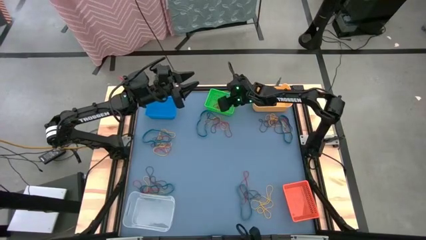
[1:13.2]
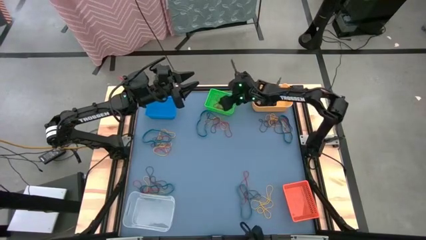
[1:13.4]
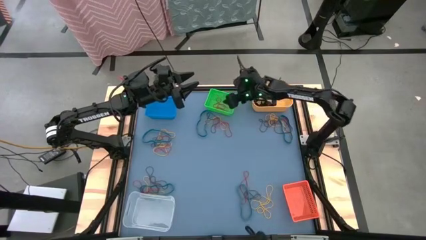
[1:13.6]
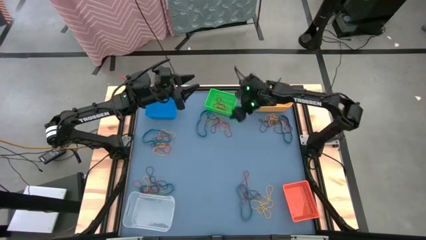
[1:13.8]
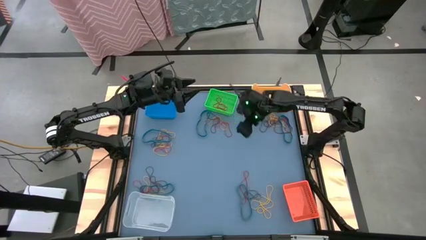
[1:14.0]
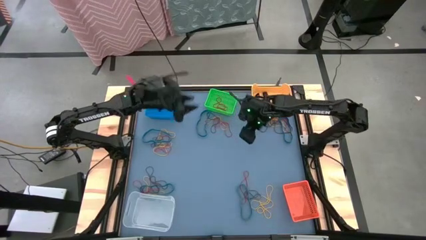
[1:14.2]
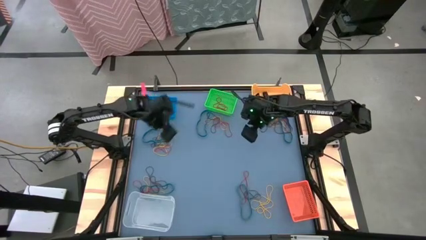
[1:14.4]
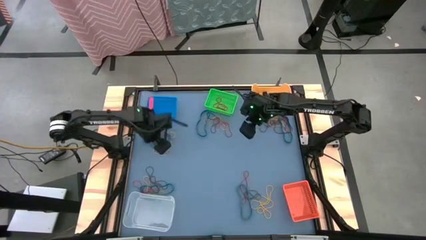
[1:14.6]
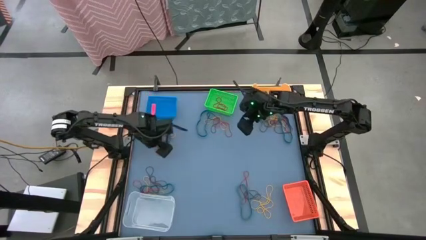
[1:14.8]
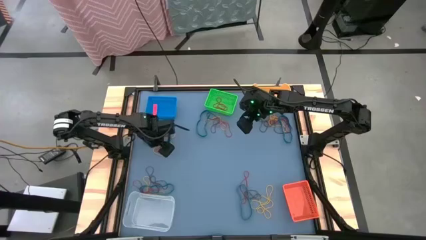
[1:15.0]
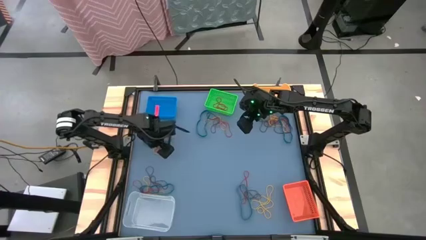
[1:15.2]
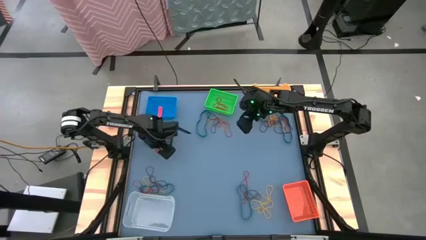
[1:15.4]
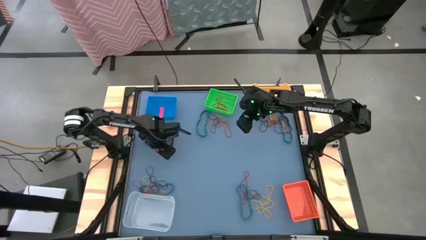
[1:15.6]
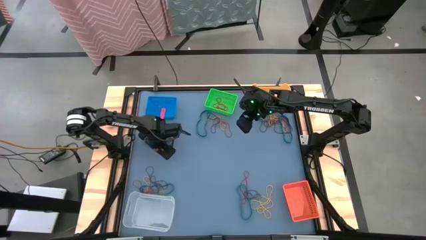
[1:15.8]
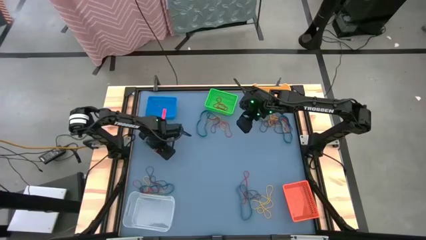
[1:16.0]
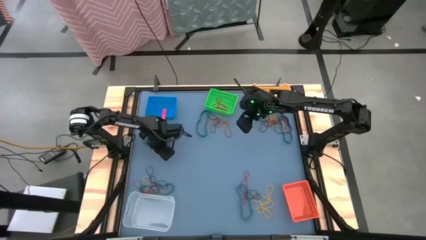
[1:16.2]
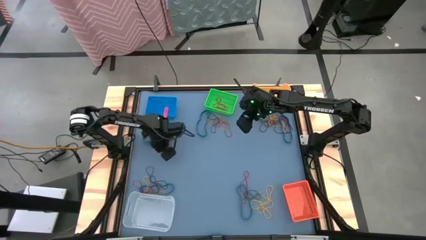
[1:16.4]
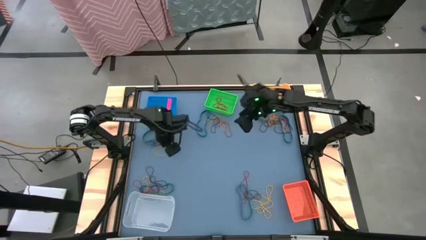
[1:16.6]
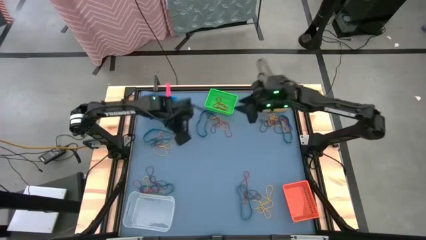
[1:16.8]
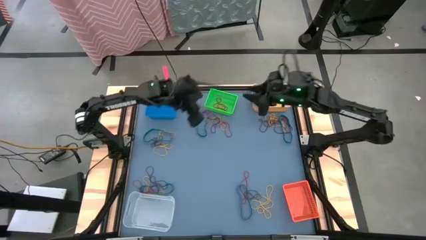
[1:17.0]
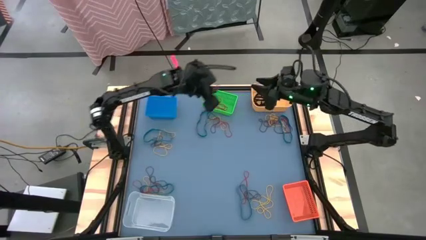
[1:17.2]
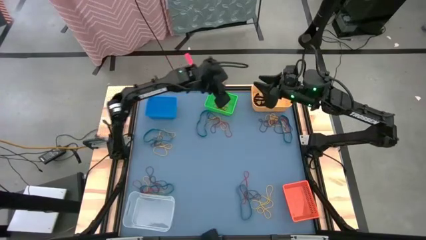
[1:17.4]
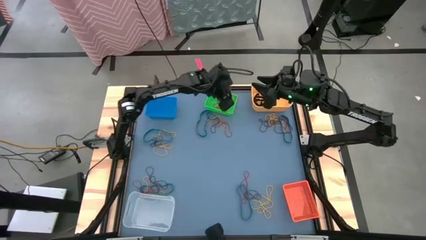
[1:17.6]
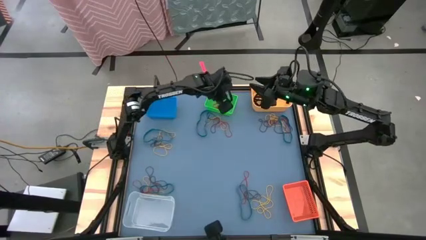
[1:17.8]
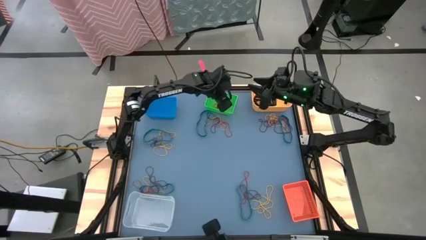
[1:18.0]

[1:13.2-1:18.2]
Task: Sort rubber bands into baskets
Put the red rubber band into the green bin

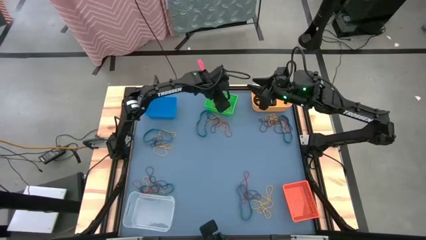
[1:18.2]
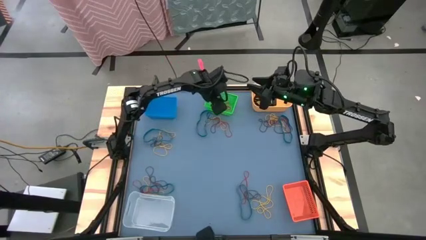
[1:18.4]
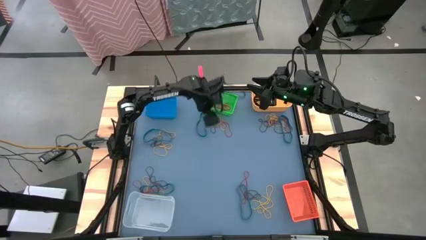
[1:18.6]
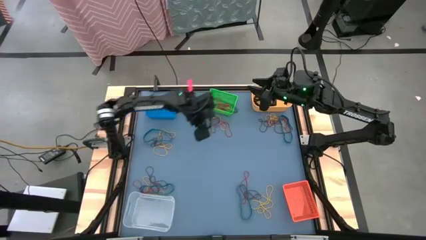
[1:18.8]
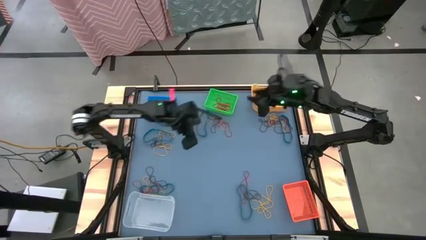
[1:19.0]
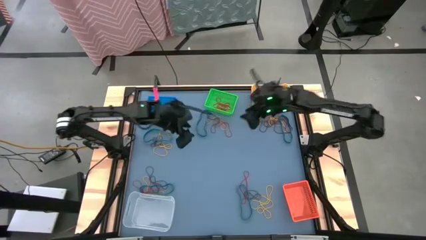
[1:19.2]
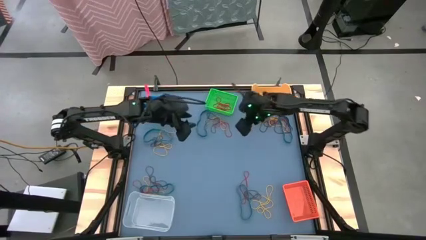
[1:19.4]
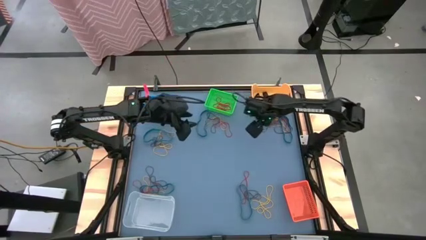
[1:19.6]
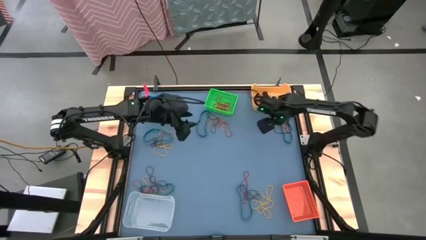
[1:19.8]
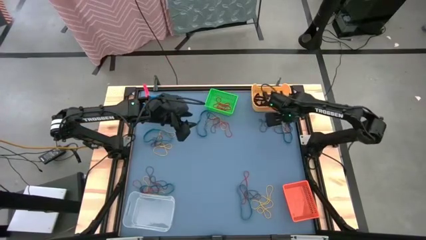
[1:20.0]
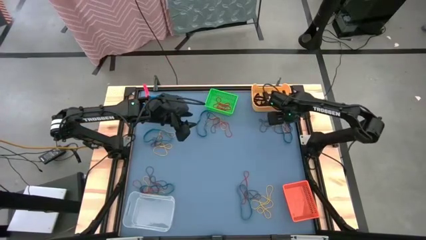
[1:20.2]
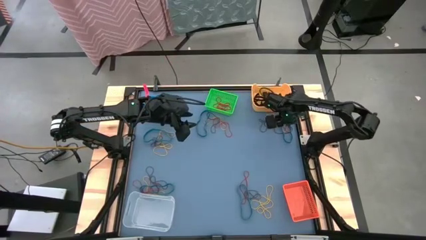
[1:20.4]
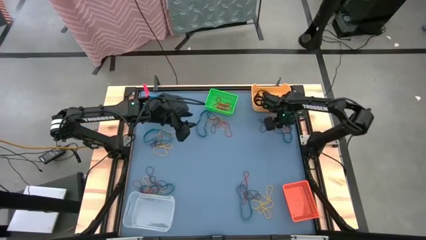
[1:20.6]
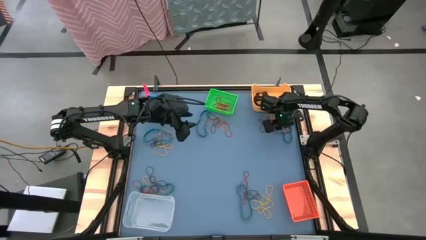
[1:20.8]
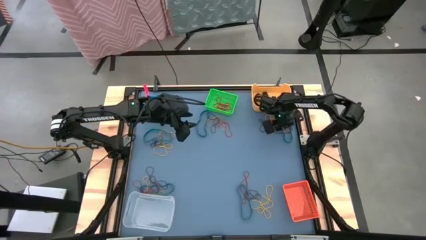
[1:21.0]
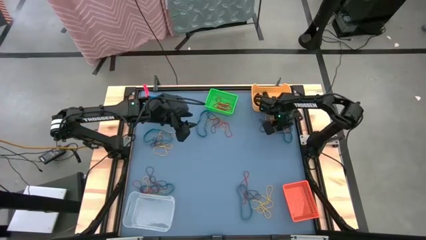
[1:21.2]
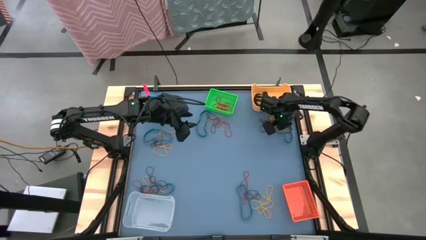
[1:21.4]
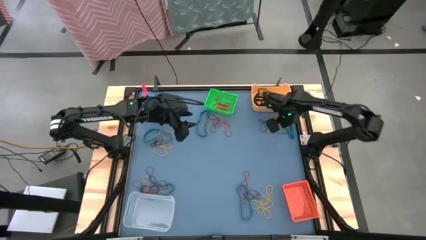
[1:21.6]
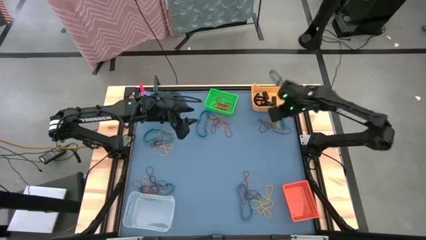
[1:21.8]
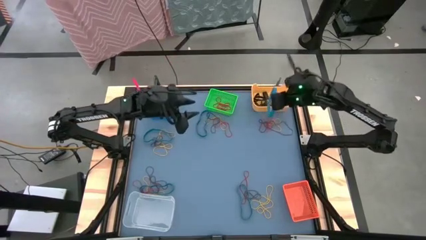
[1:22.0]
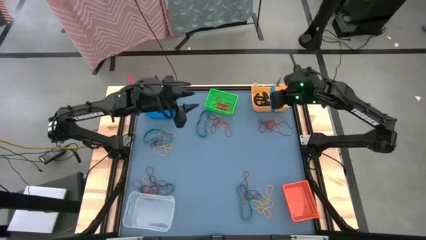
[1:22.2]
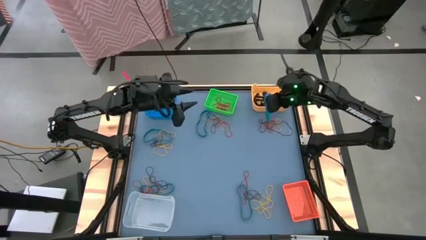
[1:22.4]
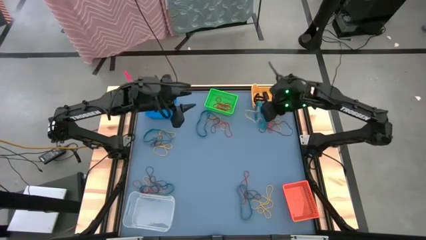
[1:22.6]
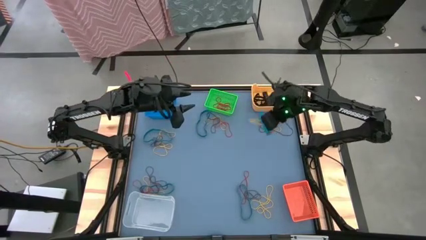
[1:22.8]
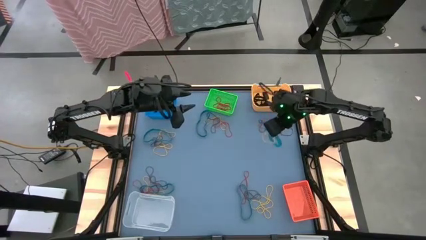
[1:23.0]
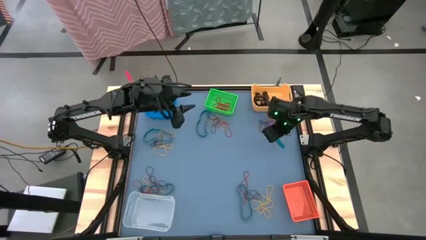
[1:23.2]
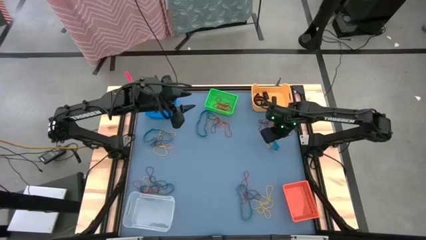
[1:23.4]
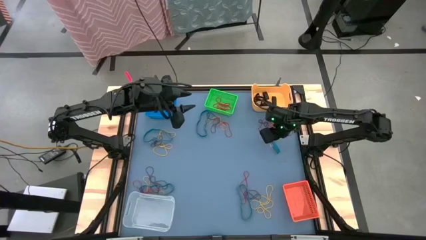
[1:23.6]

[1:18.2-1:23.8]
Put the blue rubber band into the blue bin

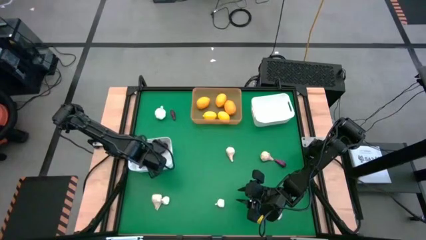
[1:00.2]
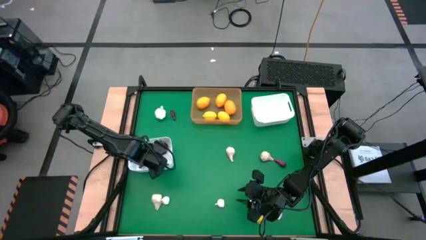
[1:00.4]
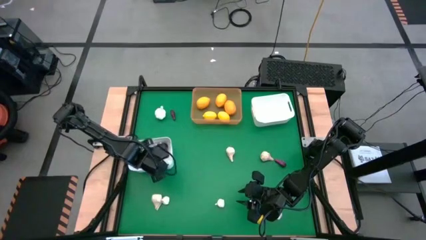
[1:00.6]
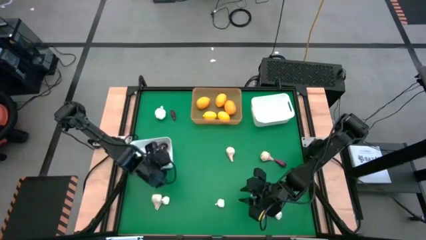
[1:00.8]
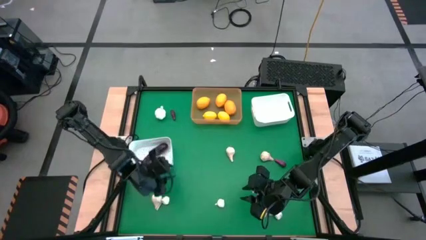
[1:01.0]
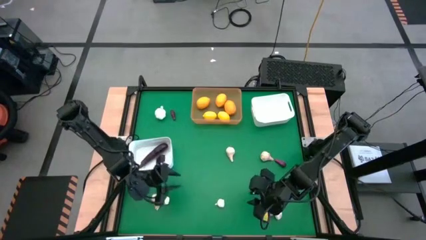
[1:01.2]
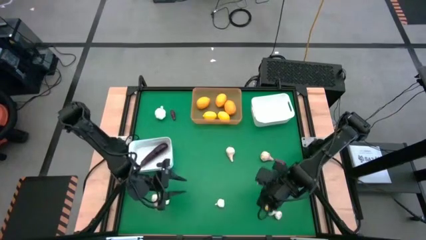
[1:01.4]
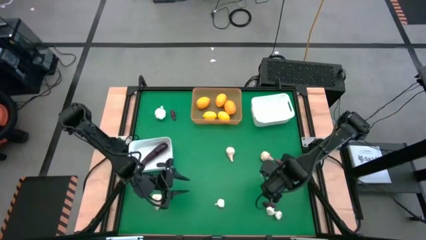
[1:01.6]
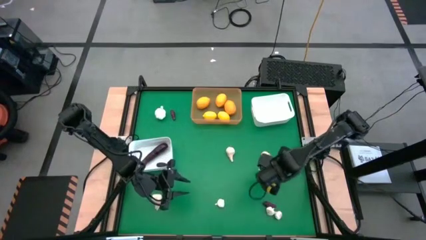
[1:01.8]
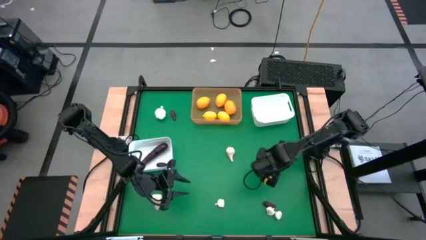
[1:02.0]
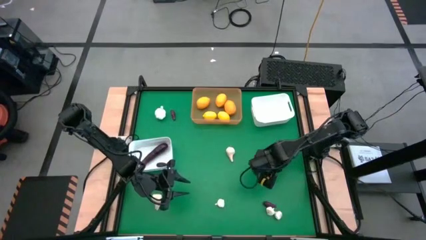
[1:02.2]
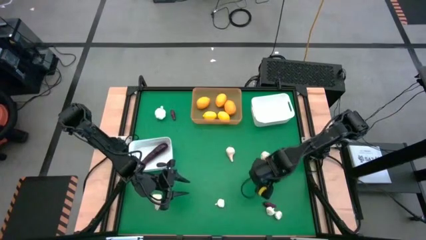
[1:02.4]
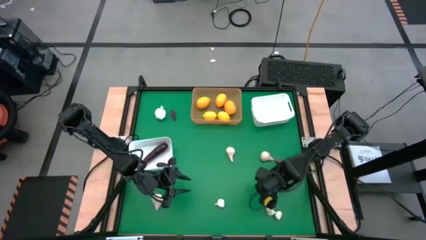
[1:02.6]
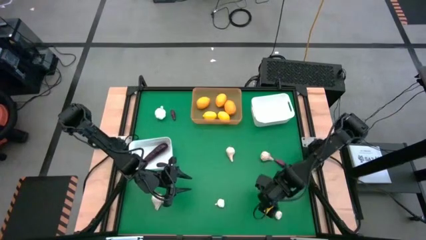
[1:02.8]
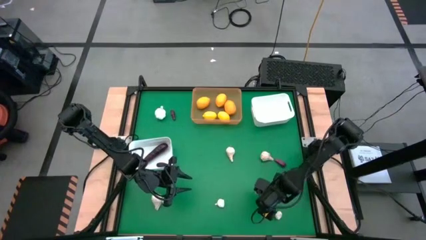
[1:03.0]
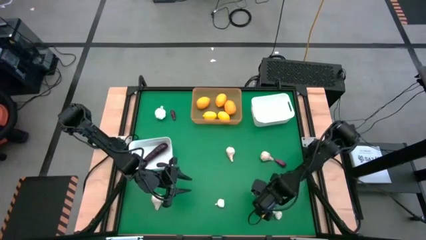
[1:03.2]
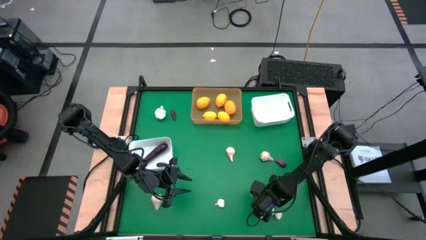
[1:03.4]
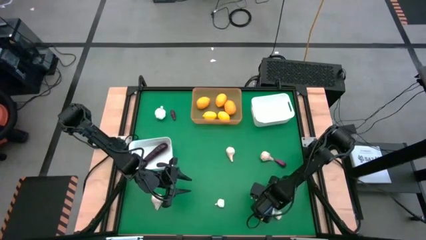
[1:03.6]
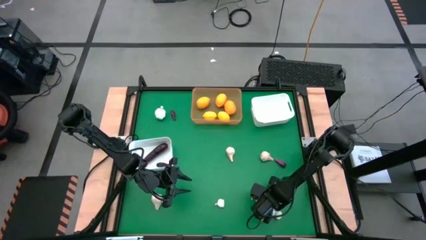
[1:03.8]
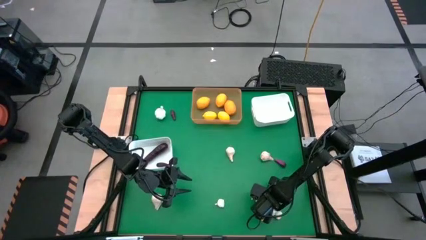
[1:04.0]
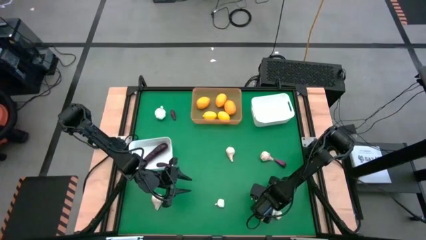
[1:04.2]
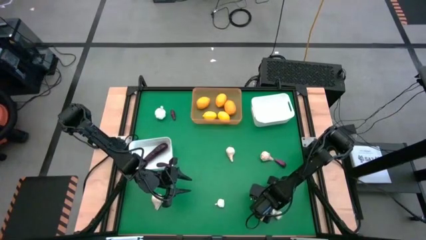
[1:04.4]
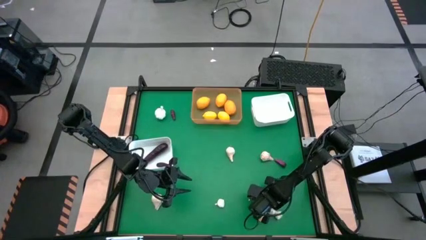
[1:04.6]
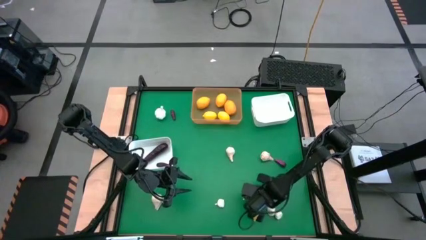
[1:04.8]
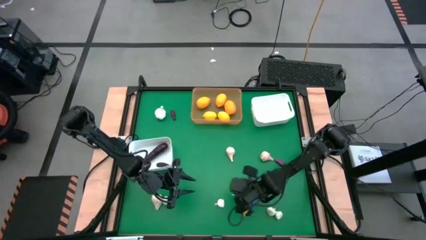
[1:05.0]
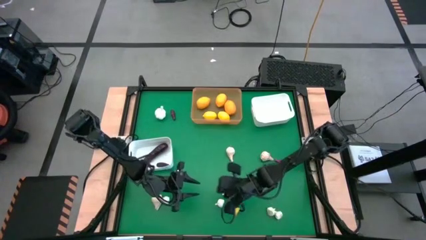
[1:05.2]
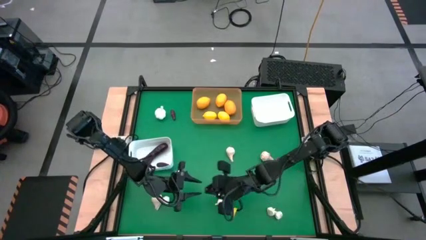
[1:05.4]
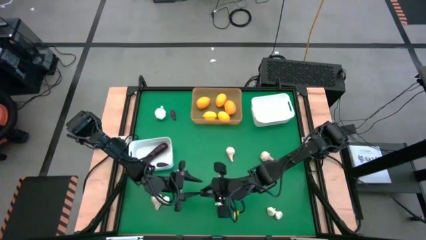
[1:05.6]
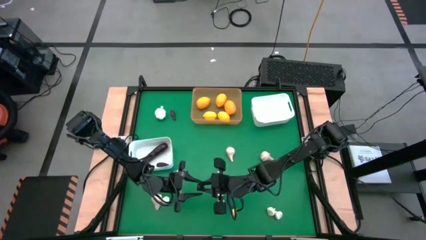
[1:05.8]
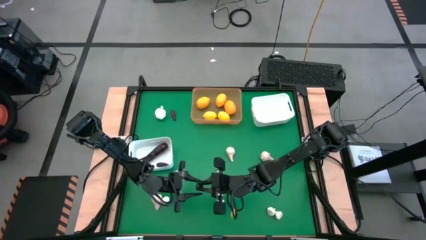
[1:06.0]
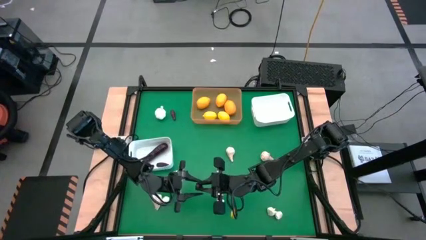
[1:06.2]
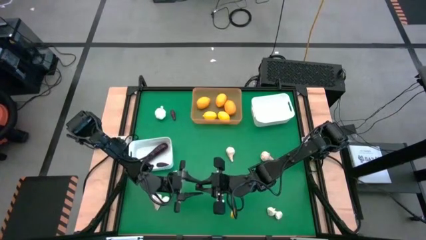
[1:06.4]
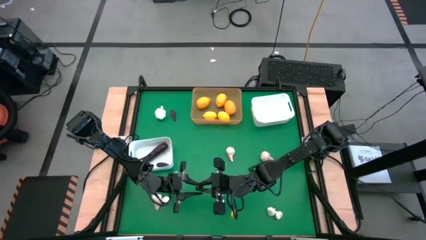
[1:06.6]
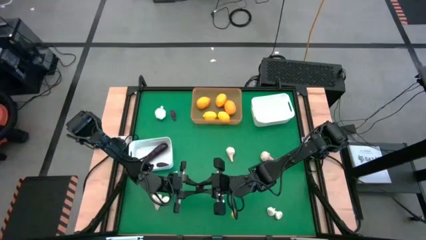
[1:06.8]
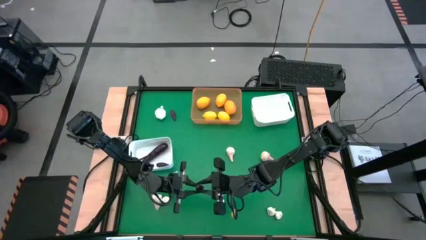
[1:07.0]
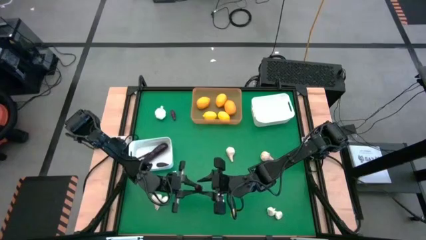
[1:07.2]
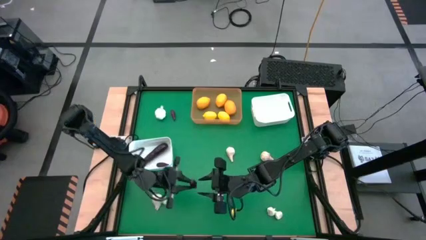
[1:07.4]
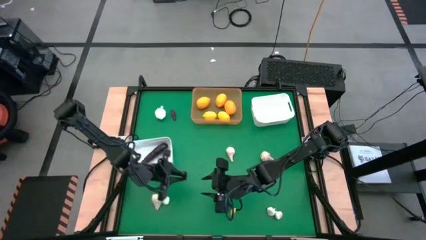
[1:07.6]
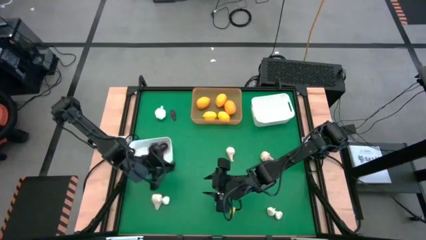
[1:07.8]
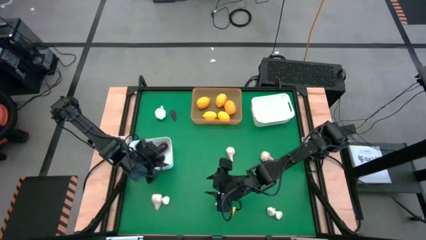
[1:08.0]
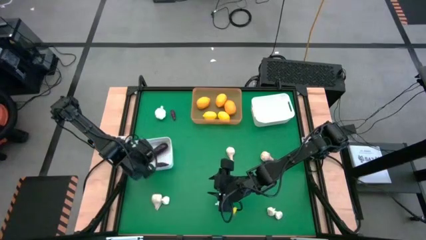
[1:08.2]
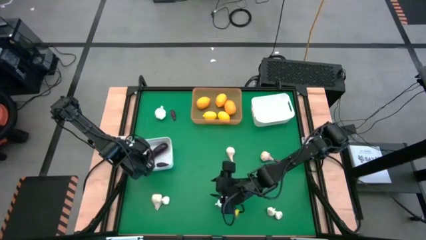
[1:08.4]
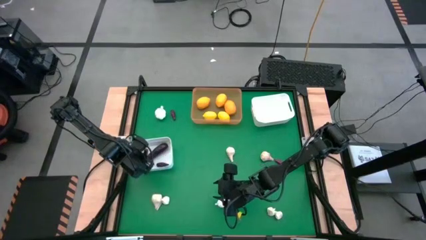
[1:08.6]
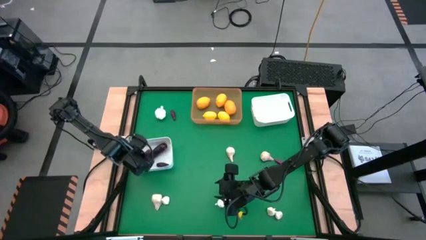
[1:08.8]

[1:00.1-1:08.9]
Task: Sort produce into baskets
Put the eggplant into the left white bin
